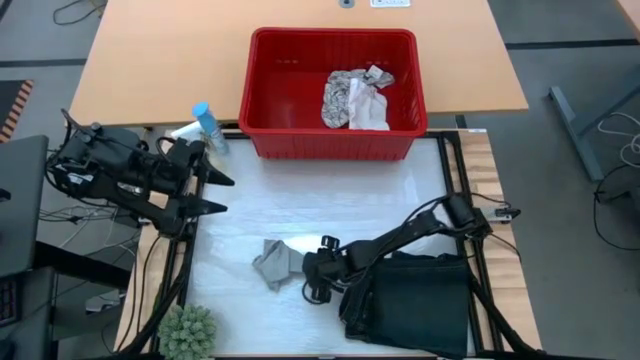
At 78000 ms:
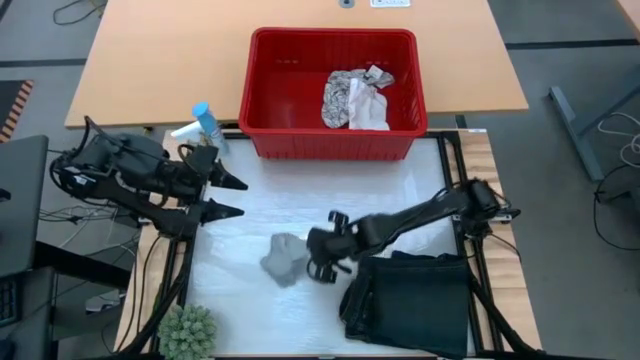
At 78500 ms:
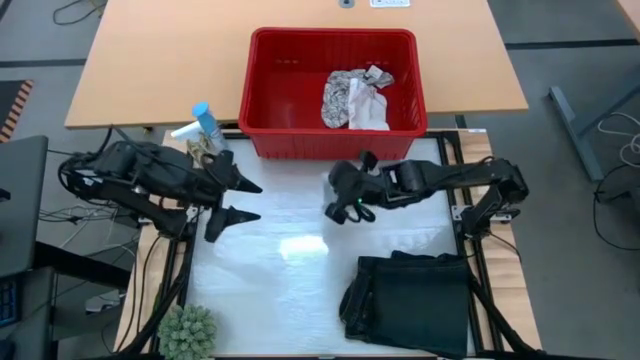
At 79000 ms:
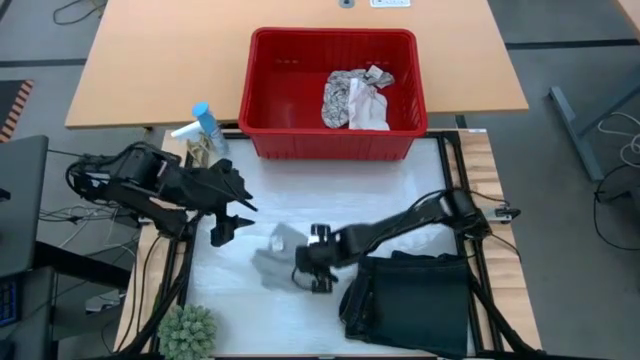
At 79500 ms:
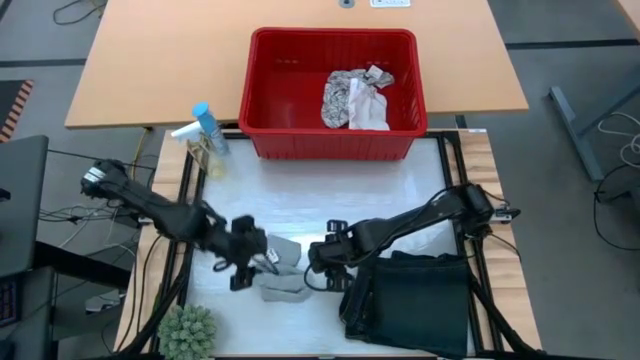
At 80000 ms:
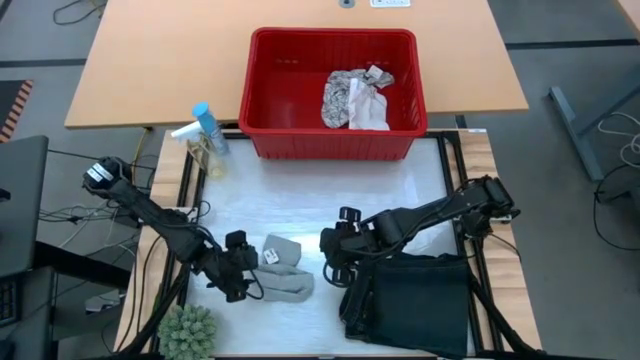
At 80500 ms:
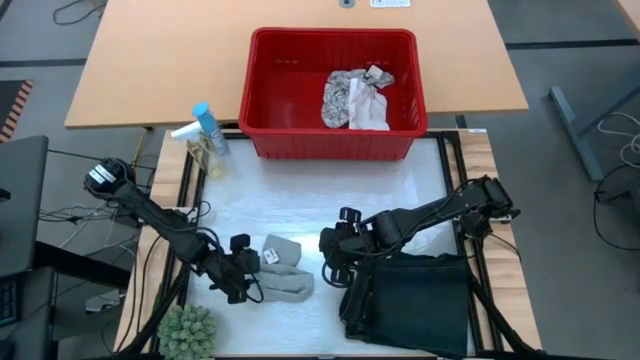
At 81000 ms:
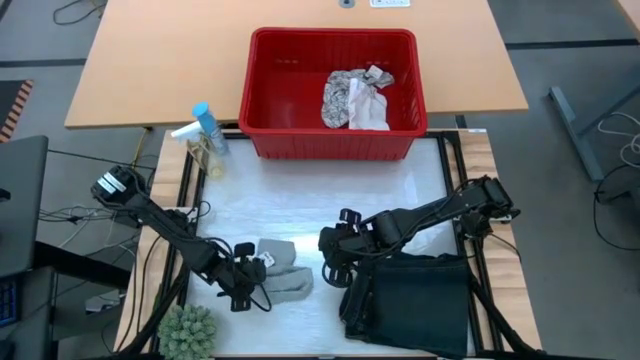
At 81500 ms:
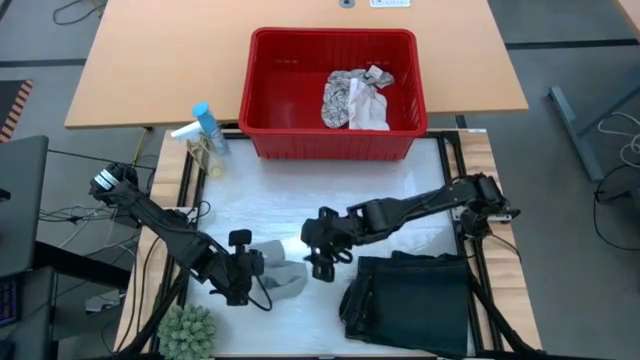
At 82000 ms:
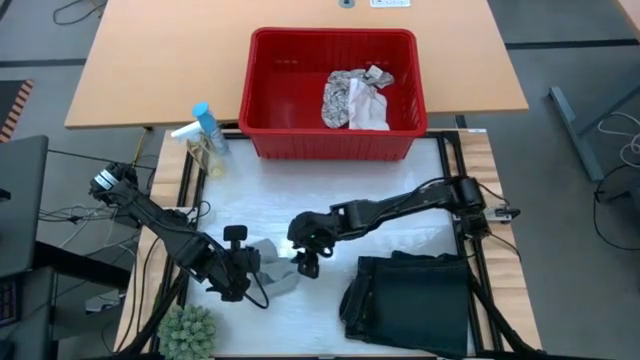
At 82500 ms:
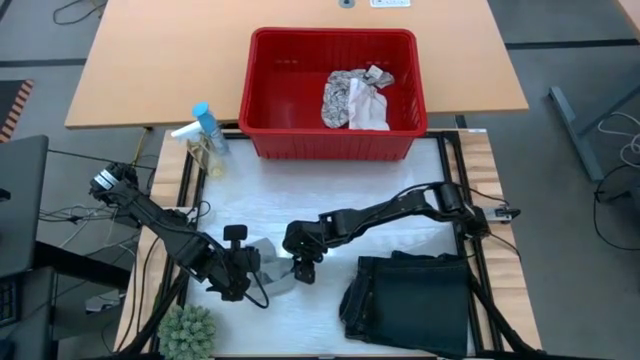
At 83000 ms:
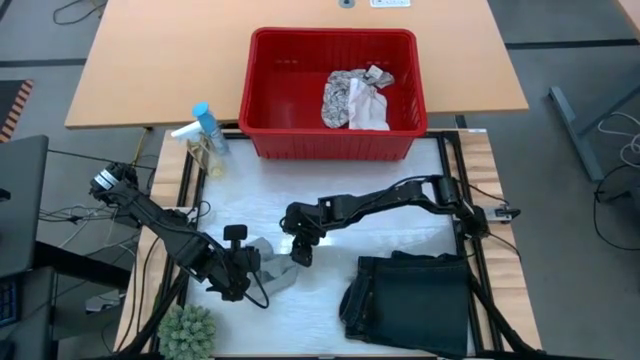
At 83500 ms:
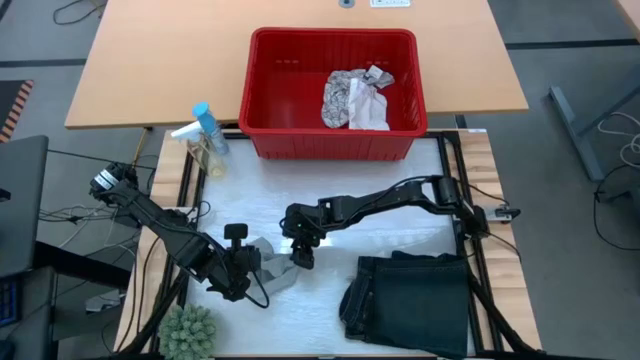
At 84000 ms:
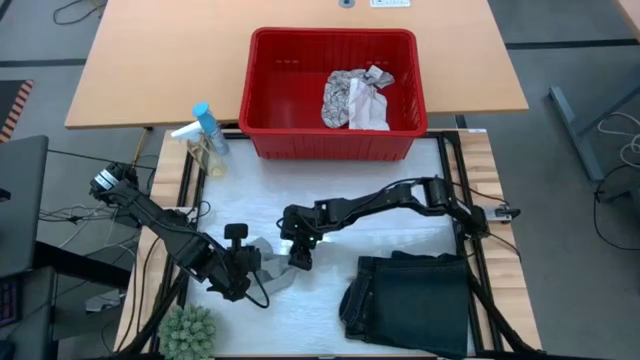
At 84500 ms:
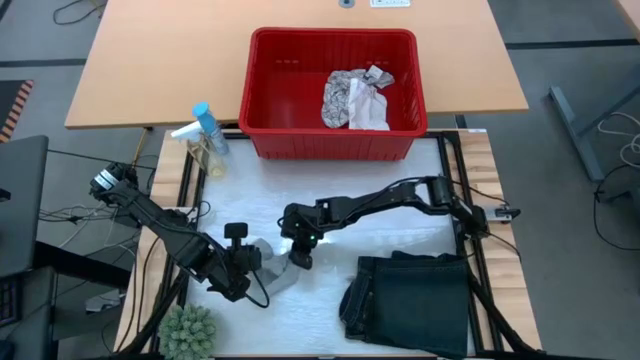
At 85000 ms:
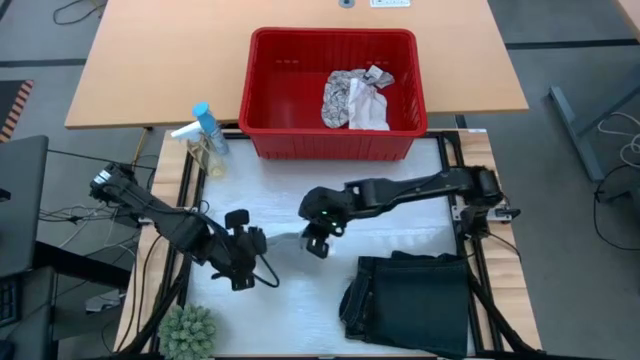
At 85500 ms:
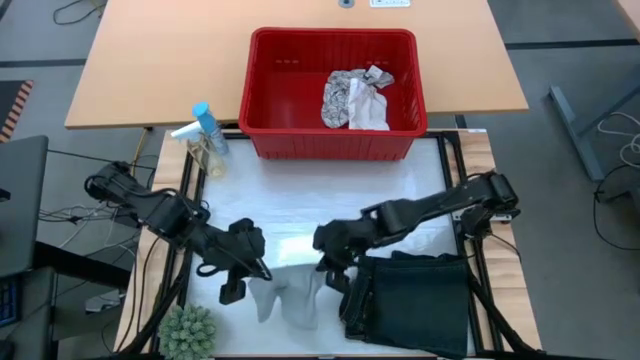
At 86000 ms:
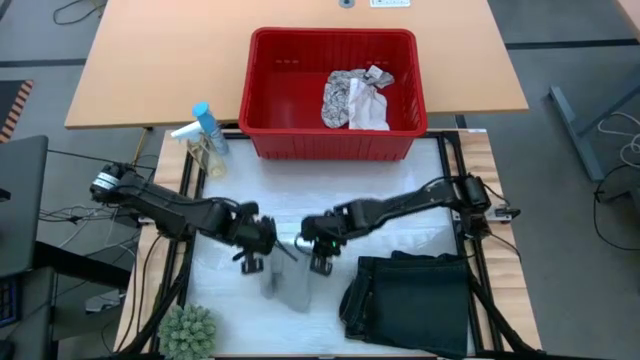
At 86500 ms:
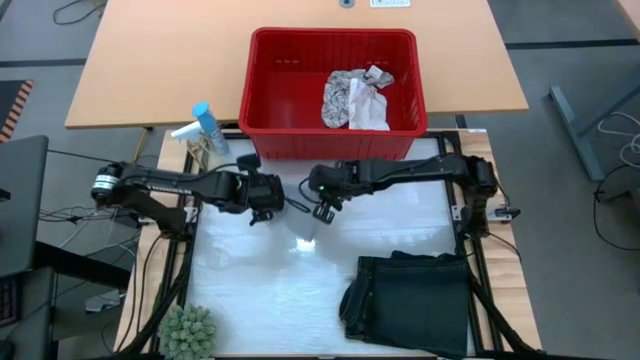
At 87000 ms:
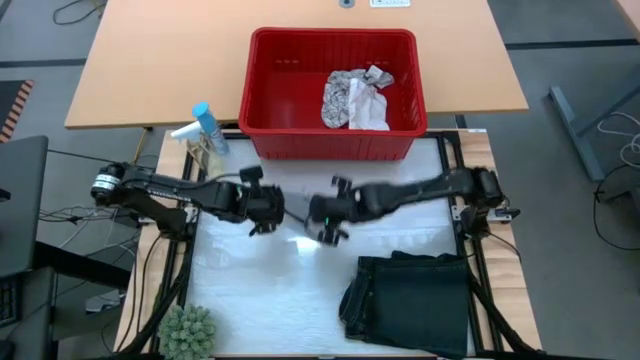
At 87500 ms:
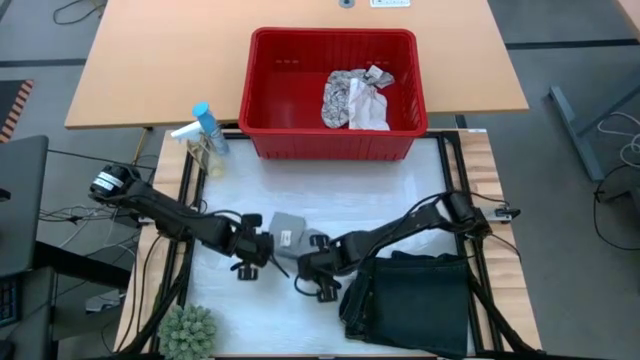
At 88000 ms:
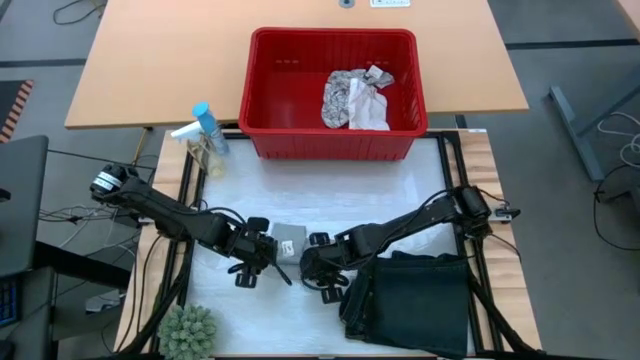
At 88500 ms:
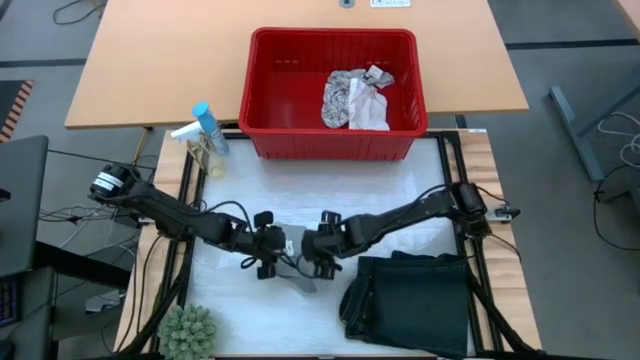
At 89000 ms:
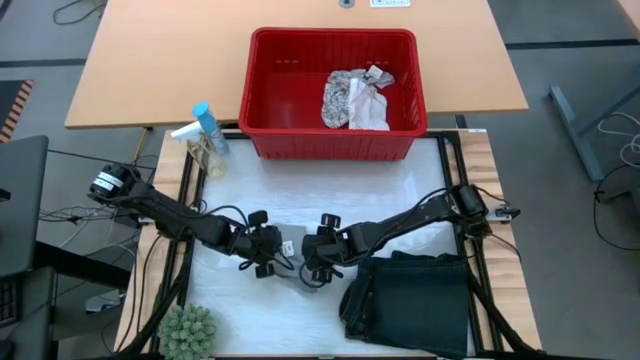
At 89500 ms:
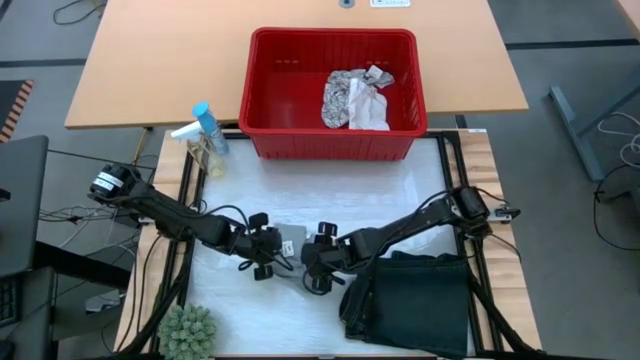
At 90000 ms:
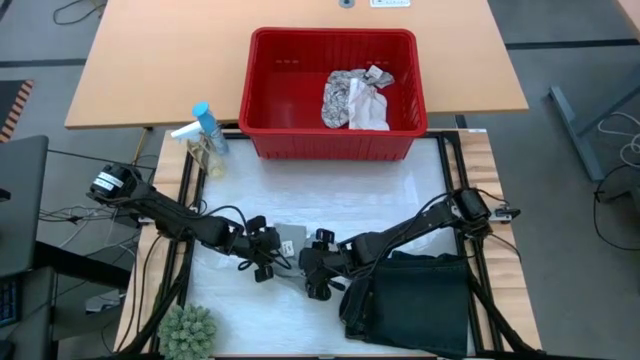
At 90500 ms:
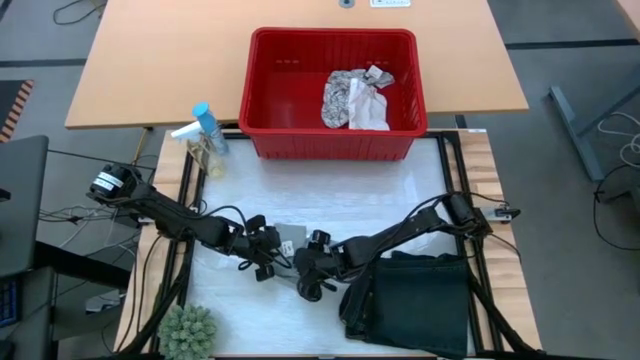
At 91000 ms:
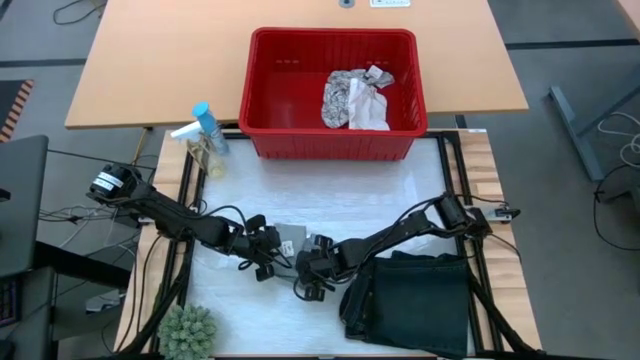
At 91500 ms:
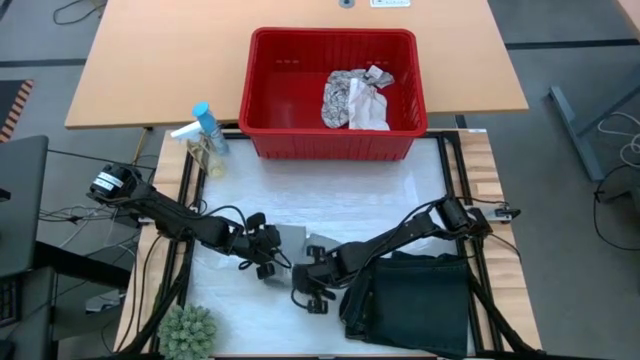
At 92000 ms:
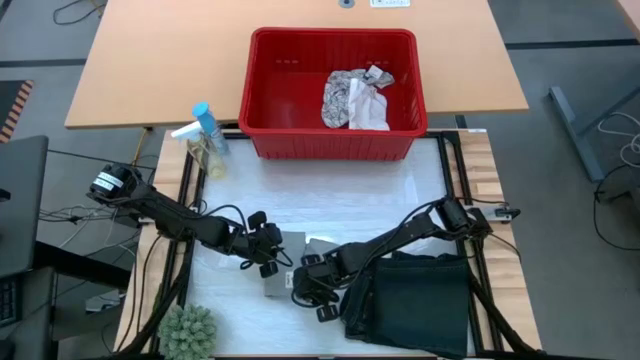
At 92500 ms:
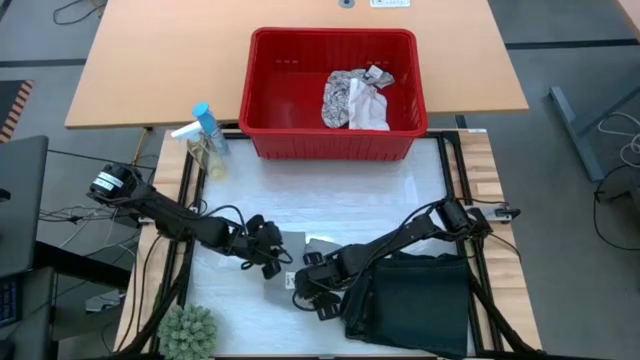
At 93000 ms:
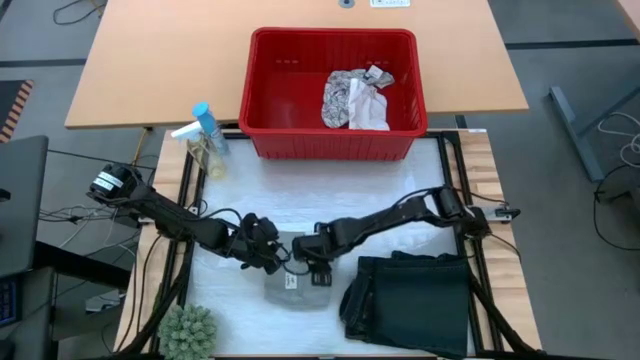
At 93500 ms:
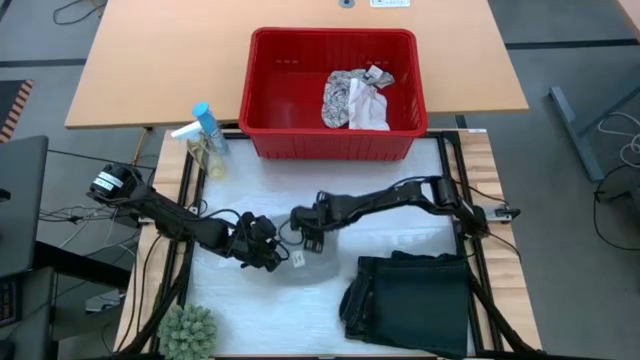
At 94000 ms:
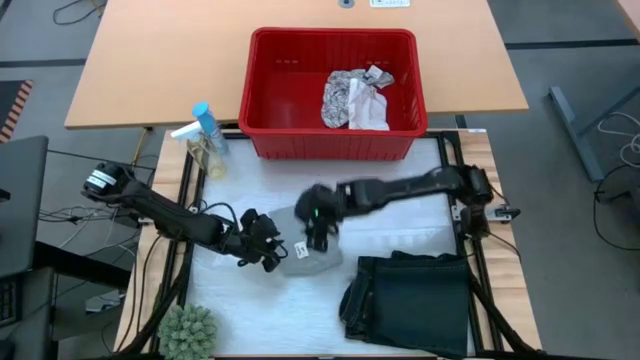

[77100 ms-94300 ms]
Task: Fold Laundry from Bin
Fold the gray boxer from the red laundry bin

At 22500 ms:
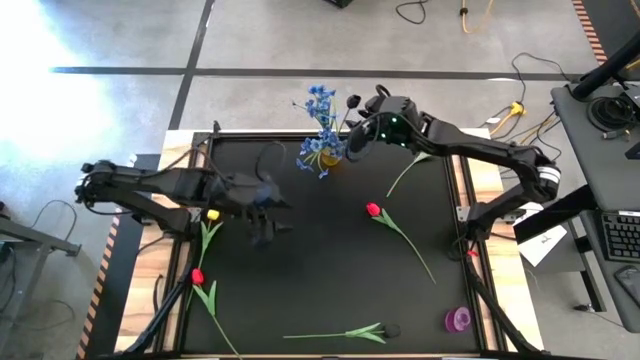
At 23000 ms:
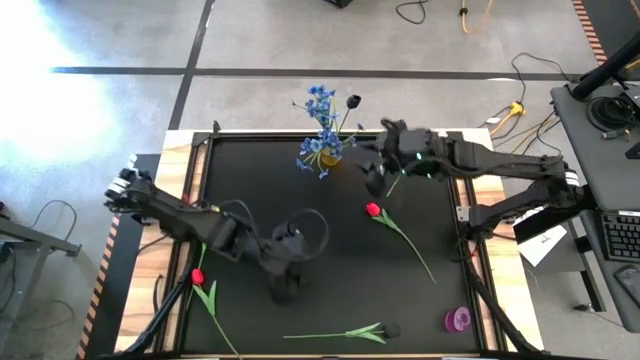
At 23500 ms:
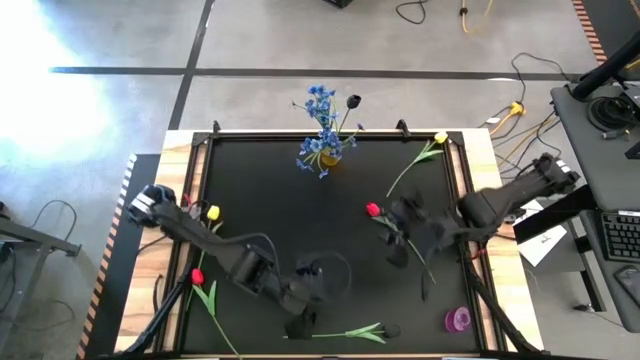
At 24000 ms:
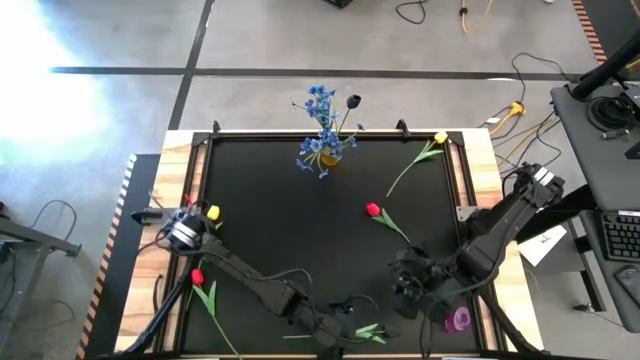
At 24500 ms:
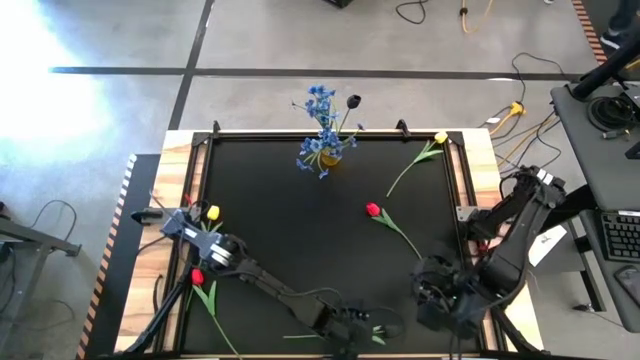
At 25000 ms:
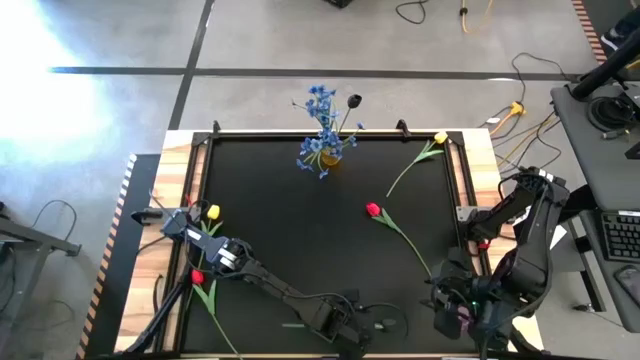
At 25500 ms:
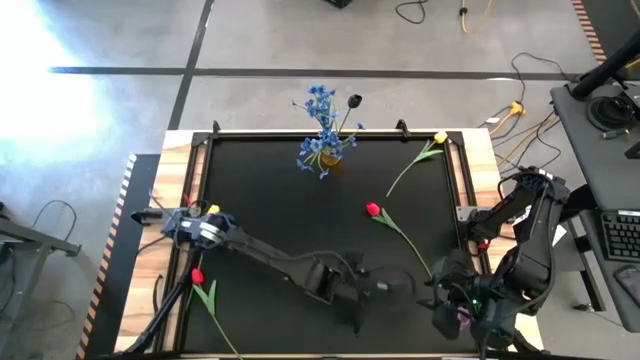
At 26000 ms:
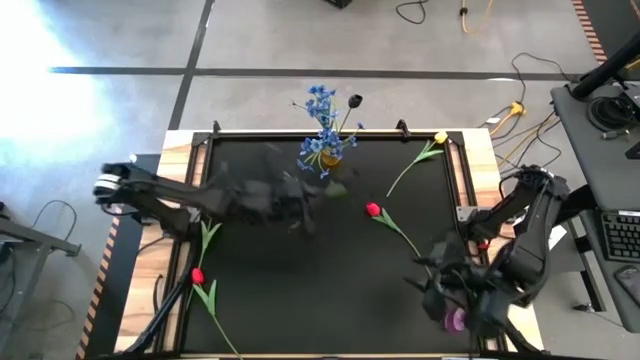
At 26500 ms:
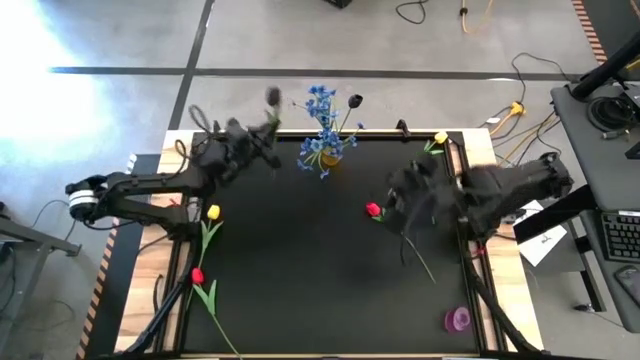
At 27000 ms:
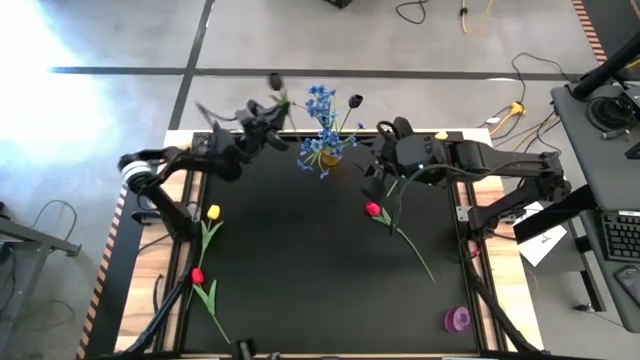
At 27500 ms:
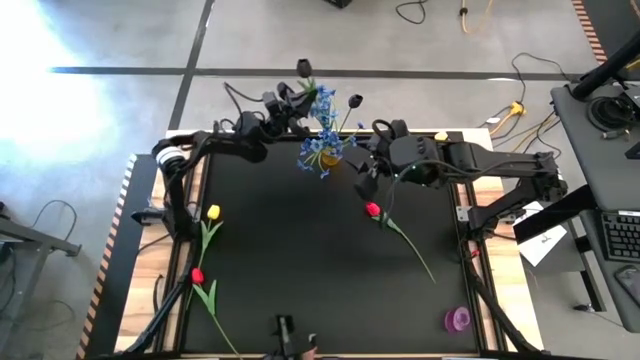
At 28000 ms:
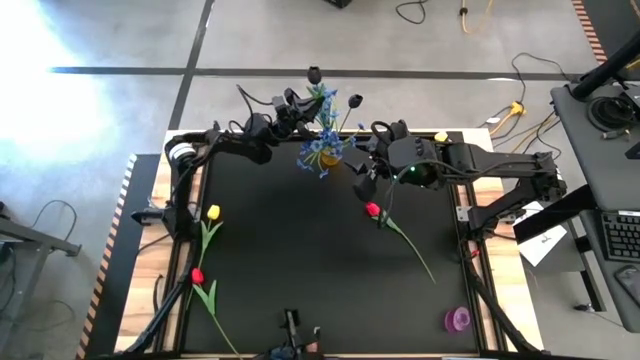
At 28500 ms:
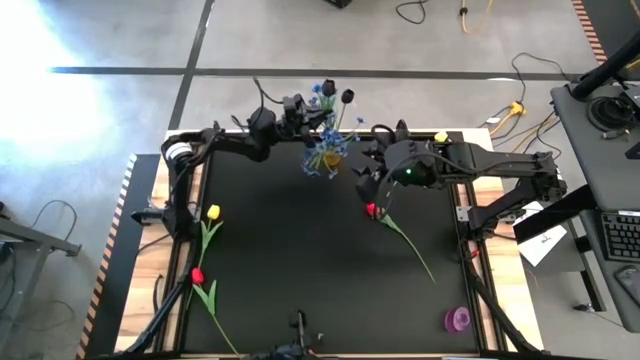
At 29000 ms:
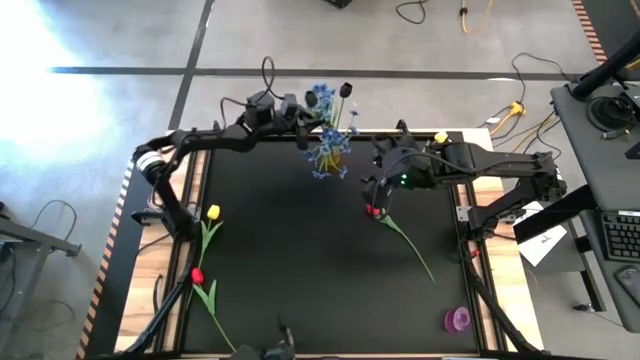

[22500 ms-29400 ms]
Task: Sort flowers into vase by color
Put the black flower into the yellow vase
